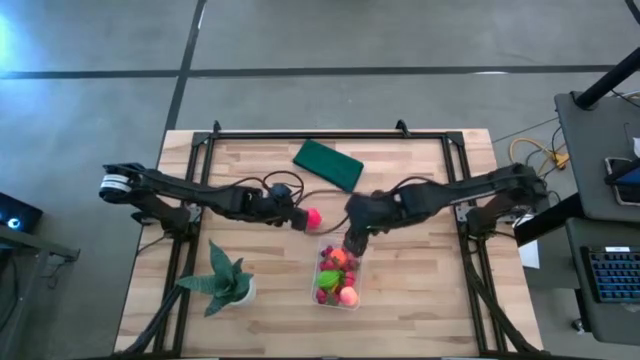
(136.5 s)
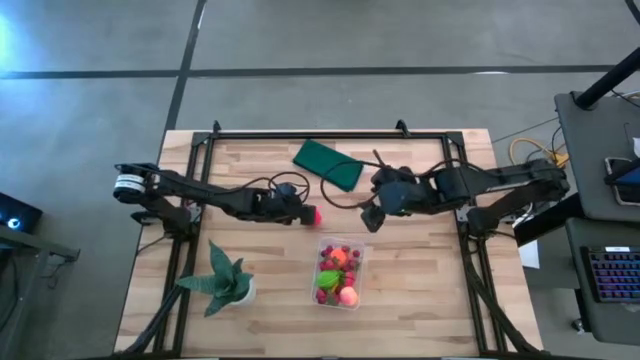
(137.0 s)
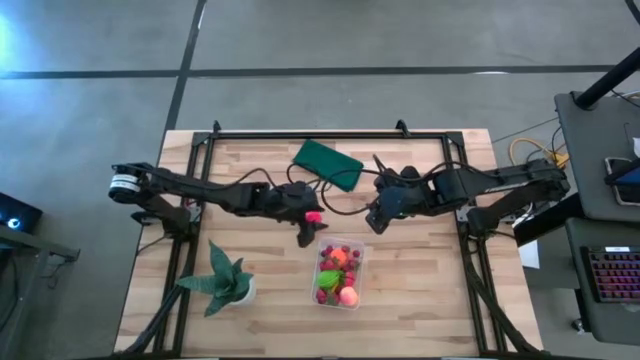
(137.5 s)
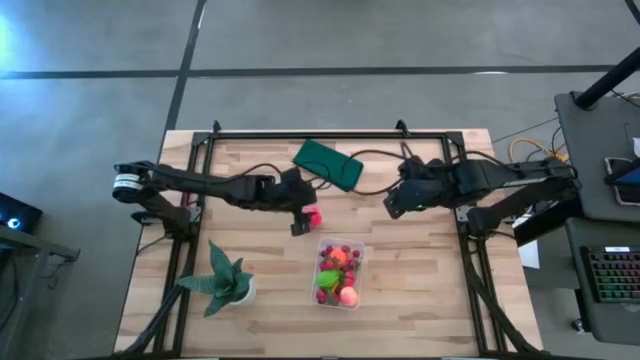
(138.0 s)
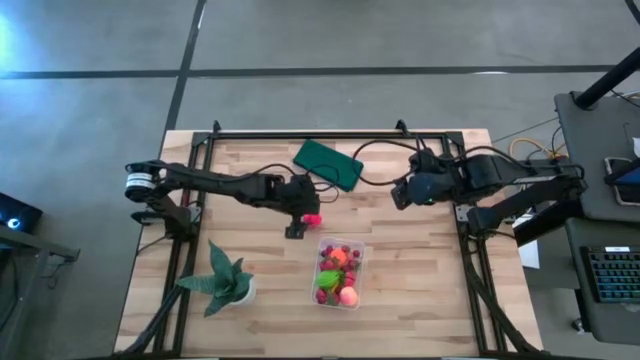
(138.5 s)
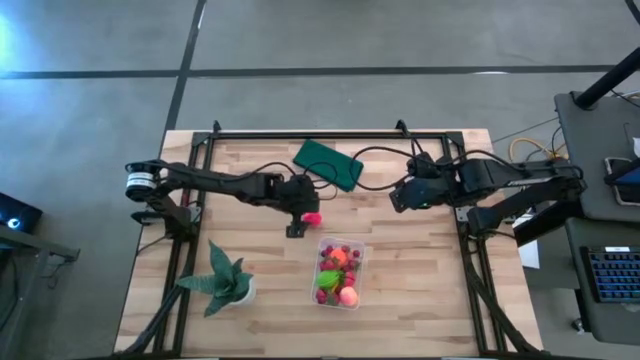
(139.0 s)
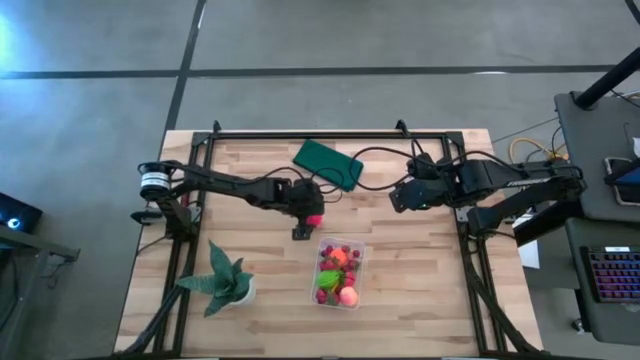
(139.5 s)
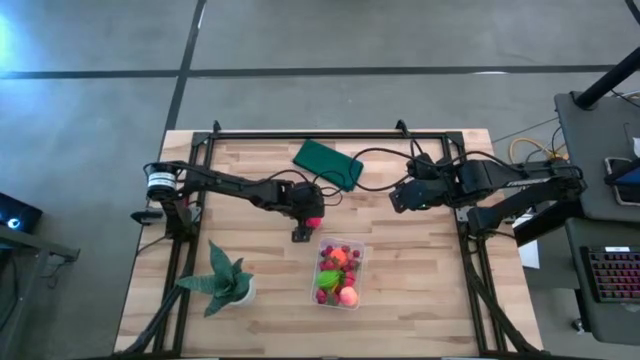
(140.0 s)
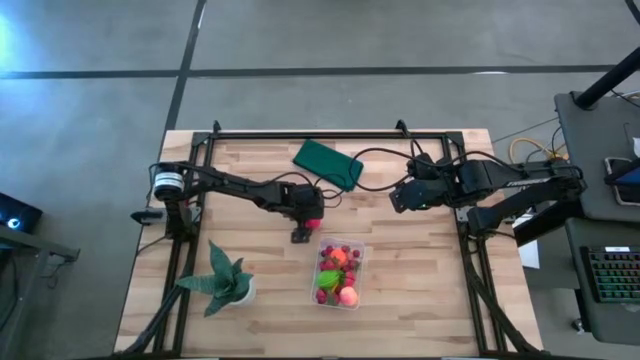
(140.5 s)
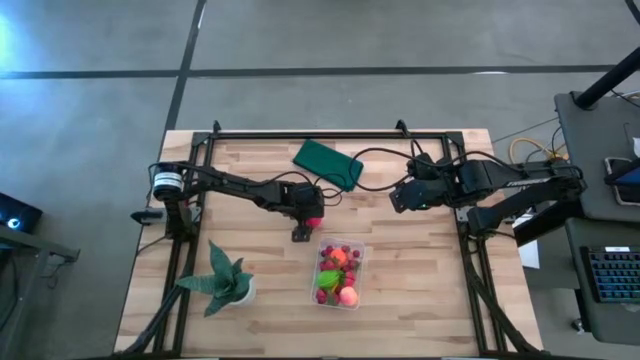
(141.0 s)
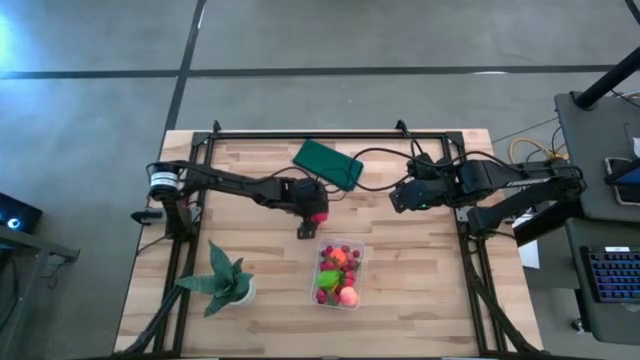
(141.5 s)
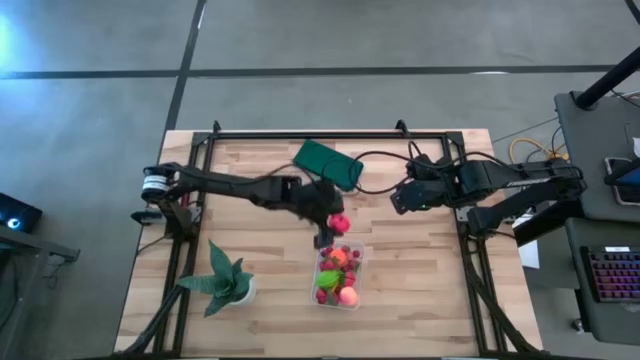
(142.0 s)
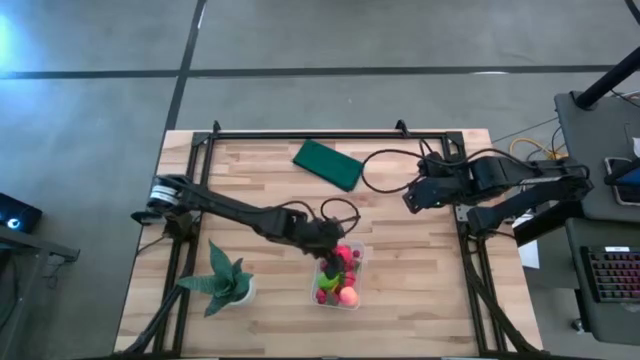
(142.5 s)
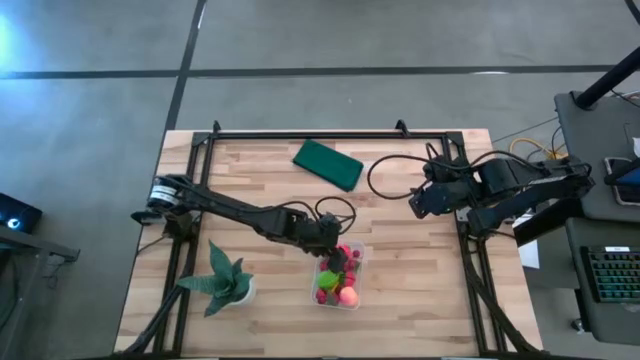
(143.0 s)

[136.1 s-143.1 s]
Task: Pick and placing Produce into tupperware
Put the red apple into the transparent bin

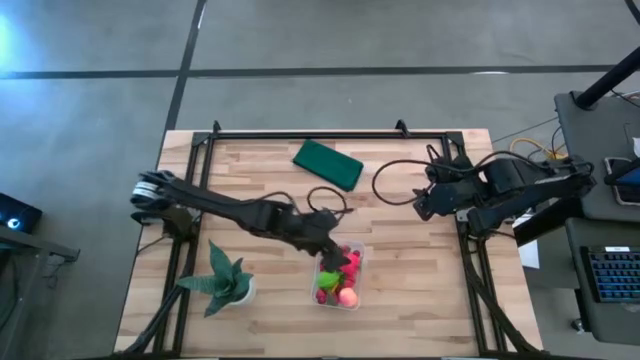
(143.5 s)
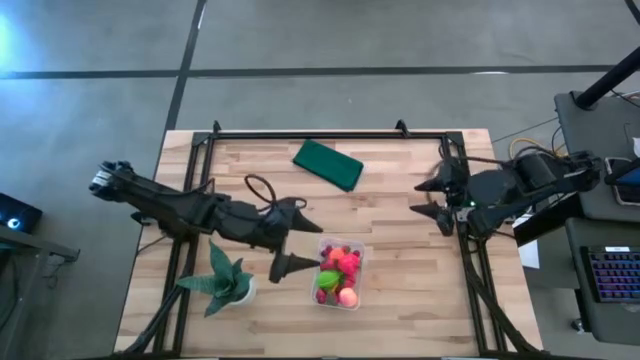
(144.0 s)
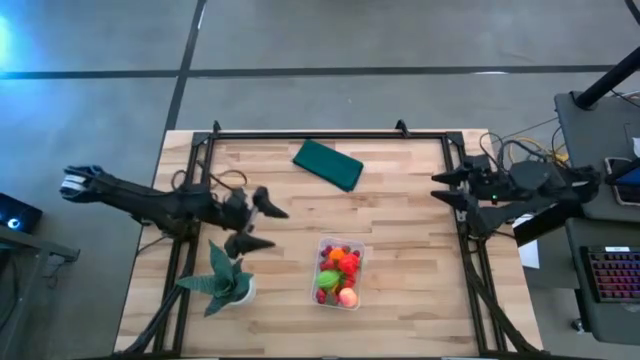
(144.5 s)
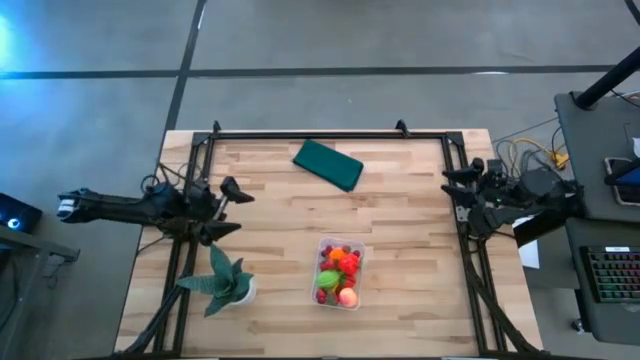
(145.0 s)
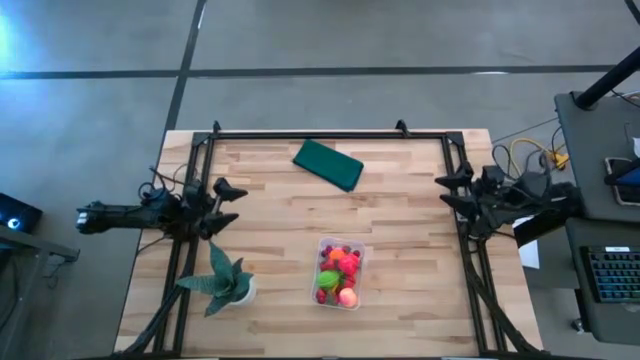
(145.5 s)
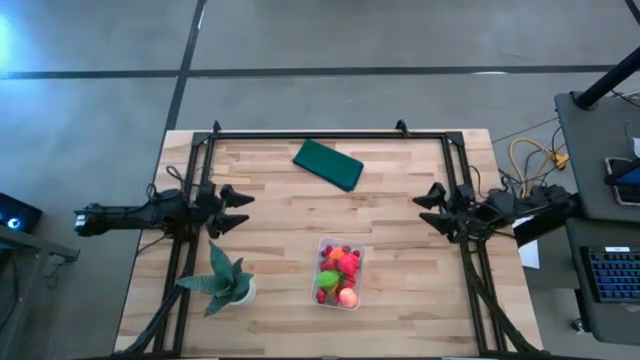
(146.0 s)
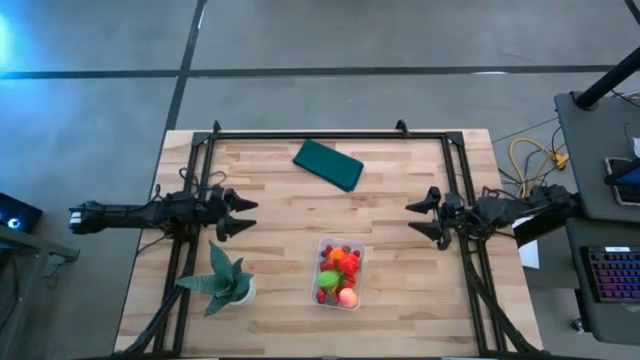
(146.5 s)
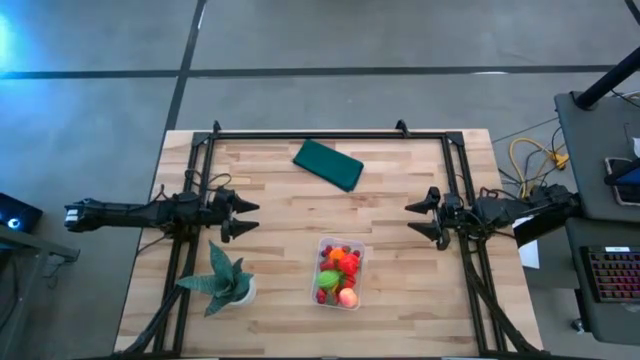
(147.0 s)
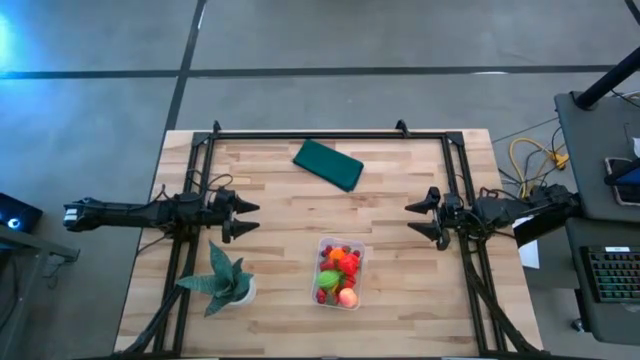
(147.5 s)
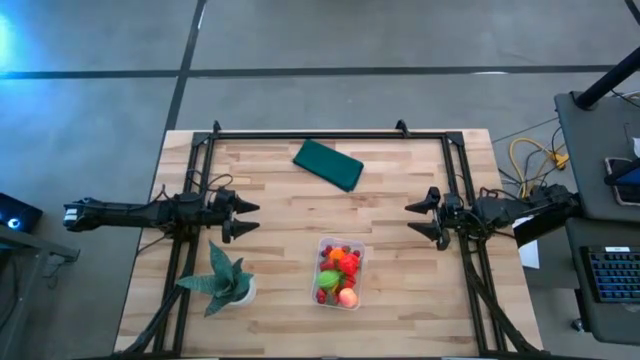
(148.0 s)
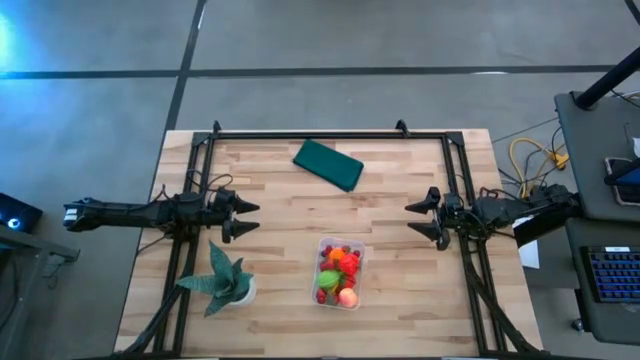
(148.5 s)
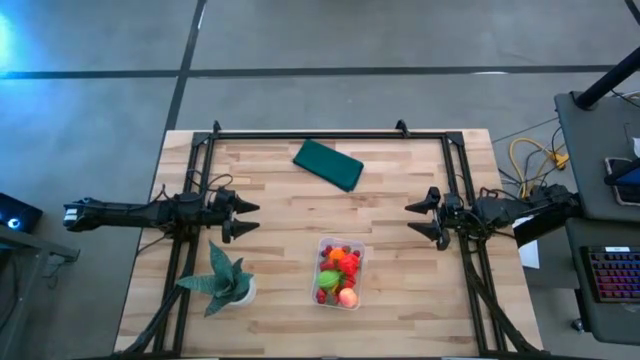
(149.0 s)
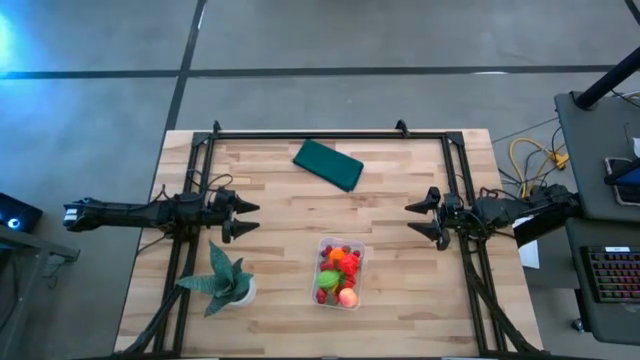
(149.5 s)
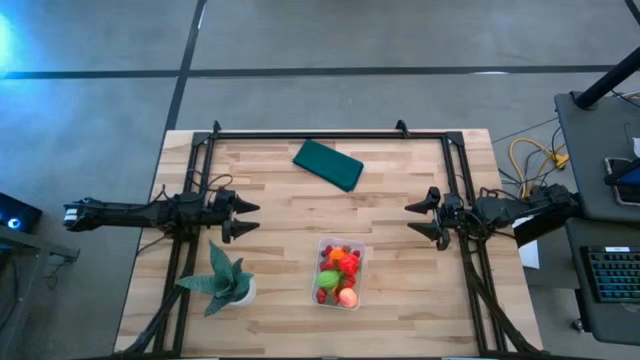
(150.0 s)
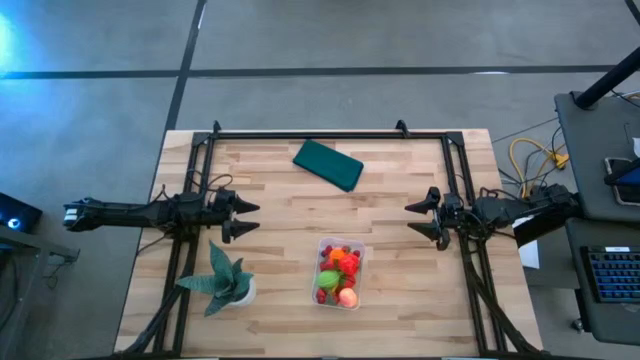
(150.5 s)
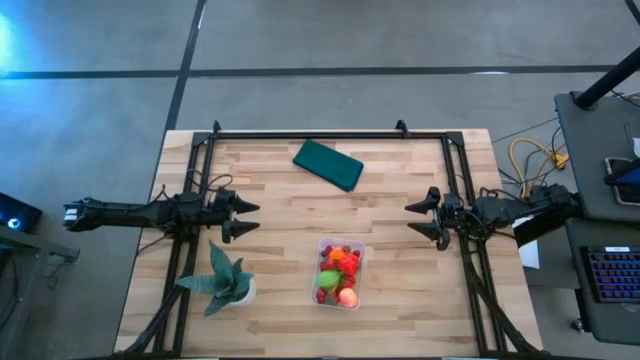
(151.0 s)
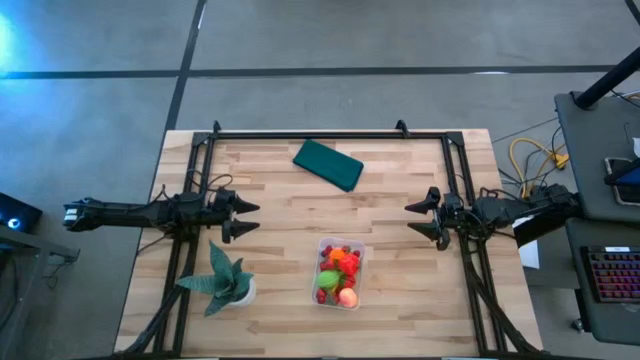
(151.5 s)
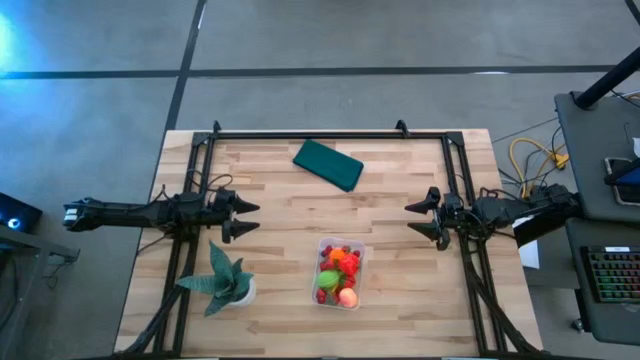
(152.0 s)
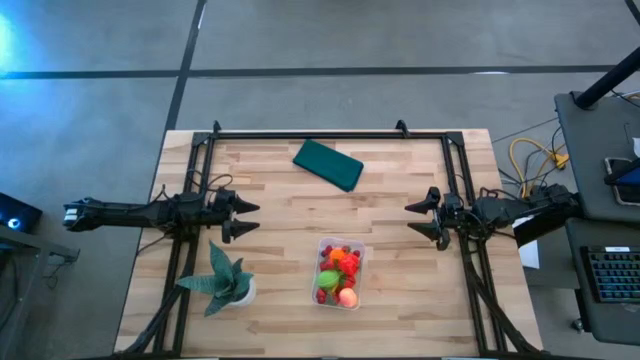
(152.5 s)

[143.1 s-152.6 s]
Return to Home Position

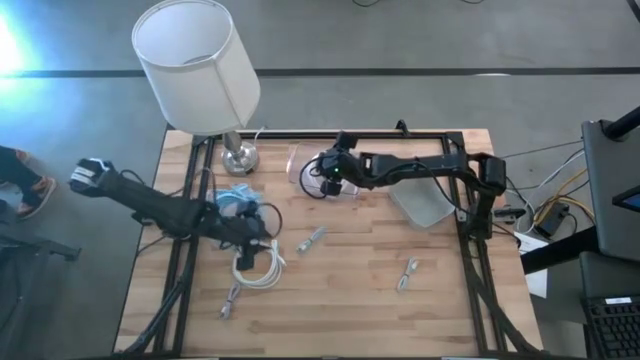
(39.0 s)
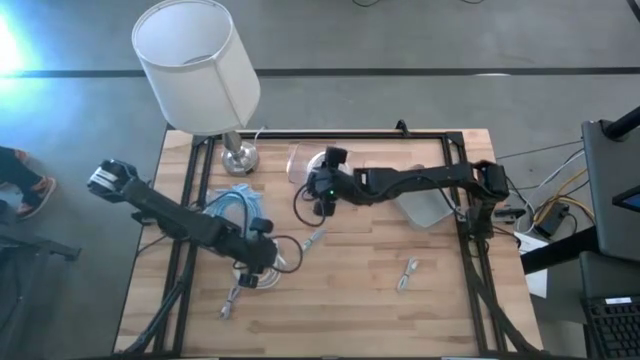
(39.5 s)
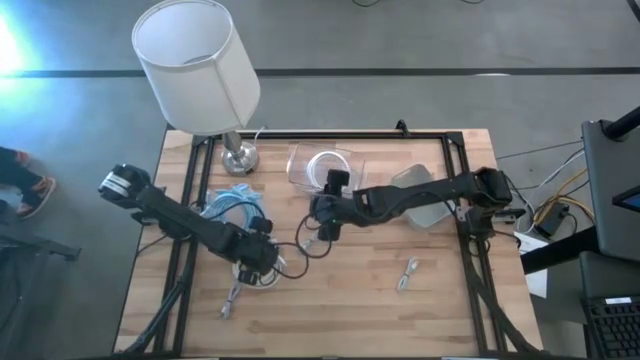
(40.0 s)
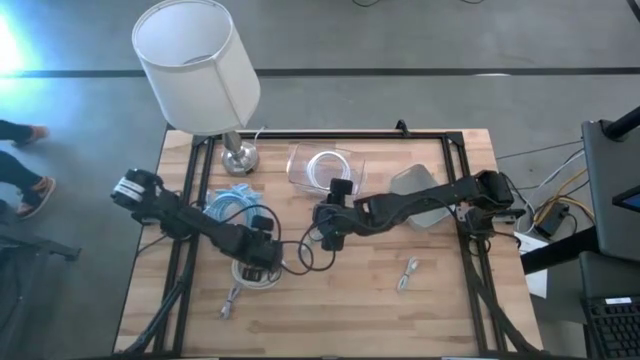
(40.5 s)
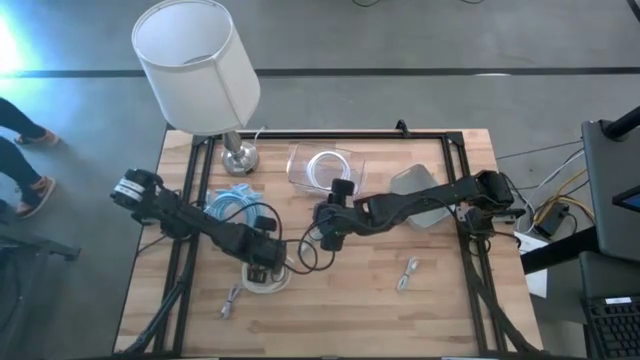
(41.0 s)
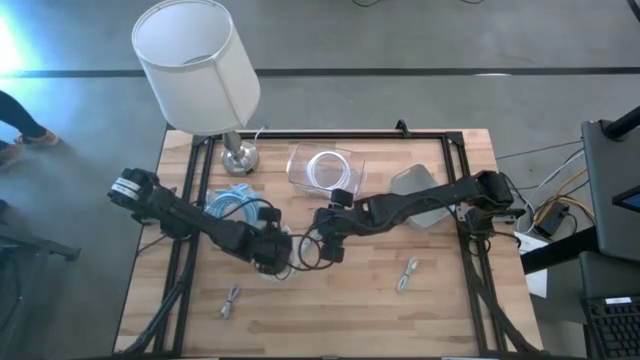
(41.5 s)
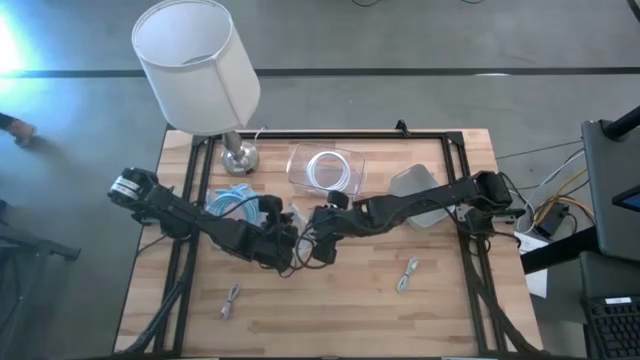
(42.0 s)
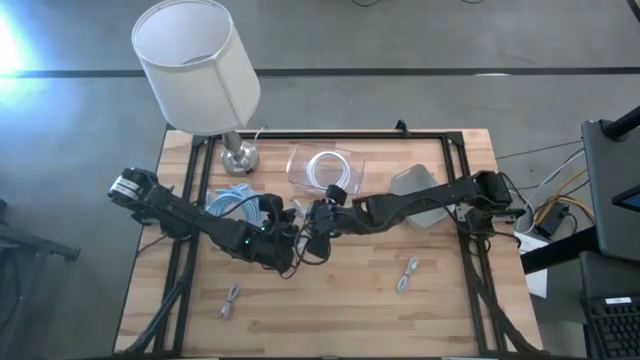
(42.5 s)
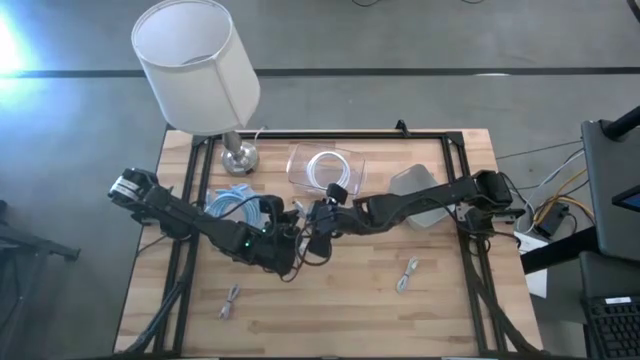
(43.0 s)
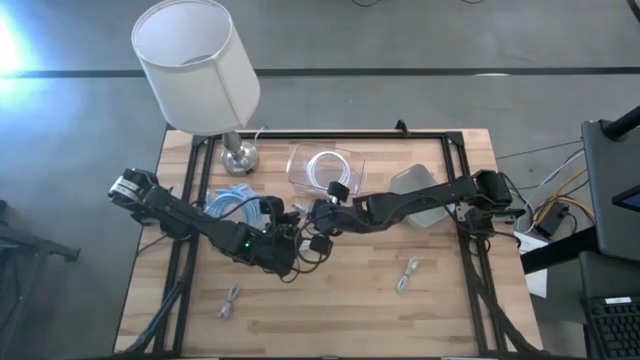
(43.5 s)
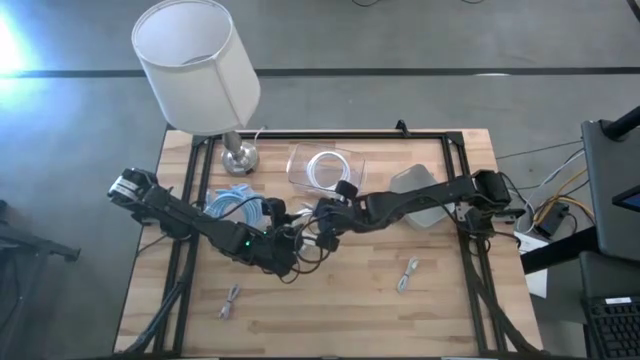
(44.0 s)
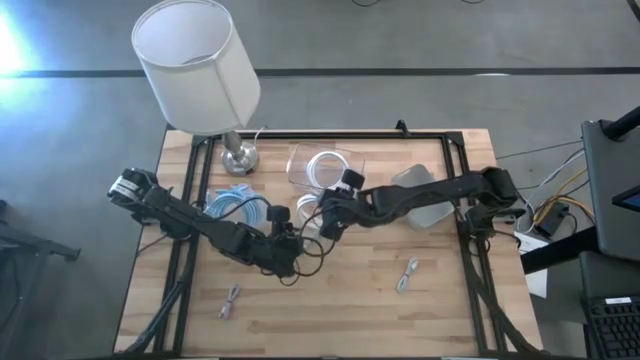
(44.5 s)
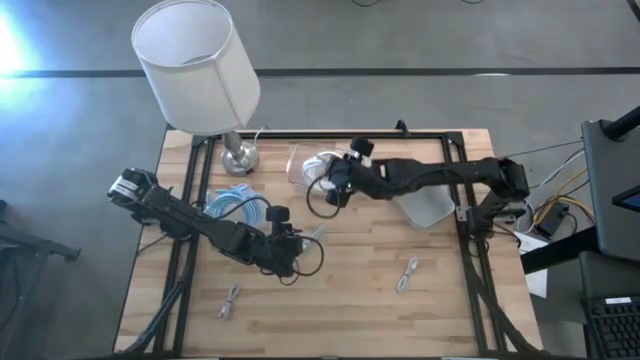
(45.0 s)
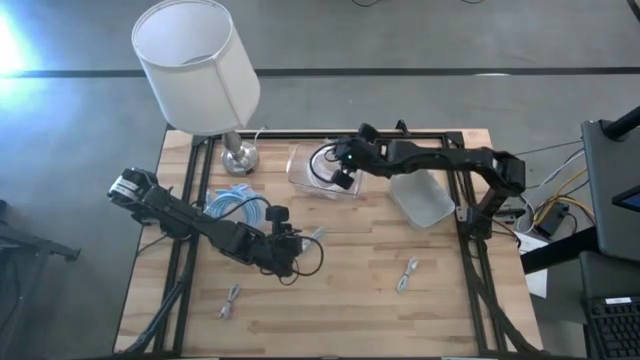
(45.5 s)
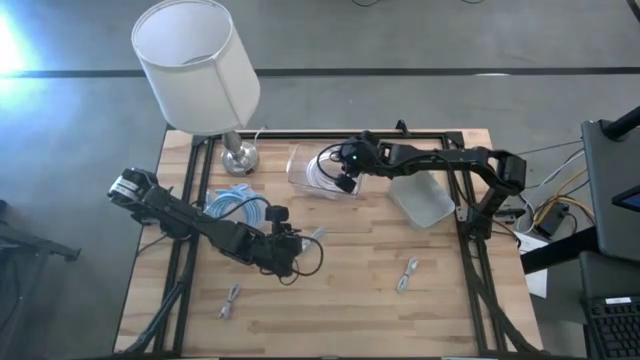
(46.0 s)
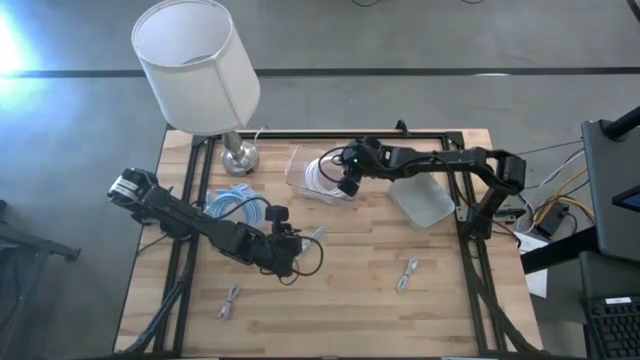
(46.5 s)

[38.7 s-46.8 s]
Task: Pick & Place USB Port
Put the white HDMI cable into the transparent bin
